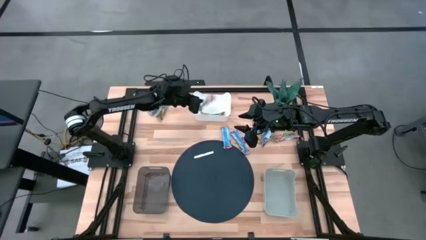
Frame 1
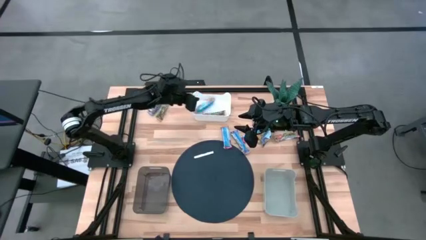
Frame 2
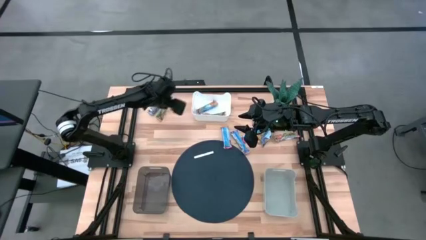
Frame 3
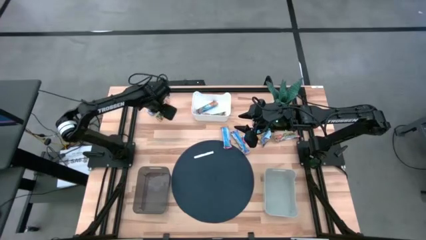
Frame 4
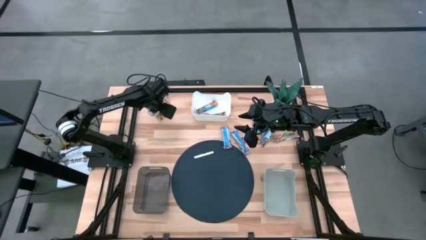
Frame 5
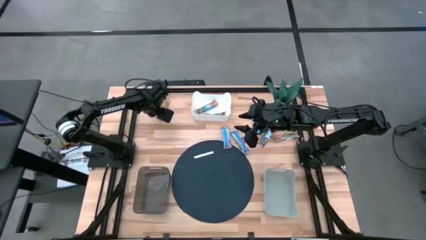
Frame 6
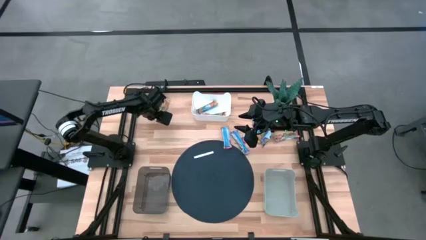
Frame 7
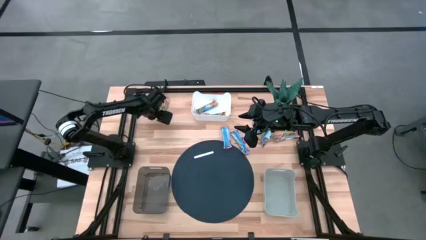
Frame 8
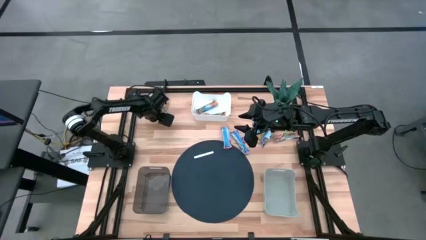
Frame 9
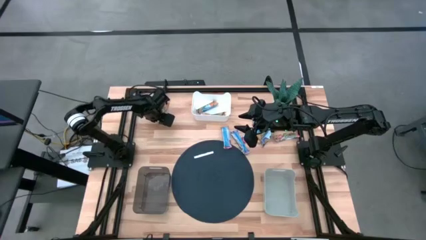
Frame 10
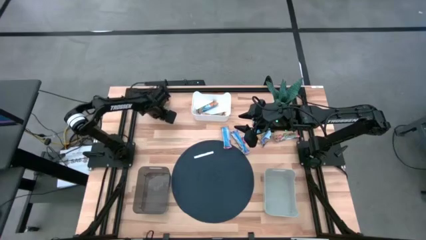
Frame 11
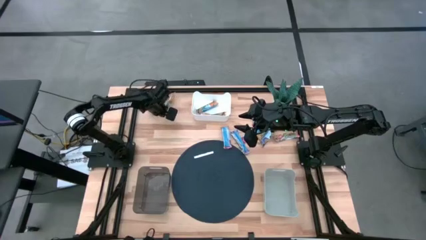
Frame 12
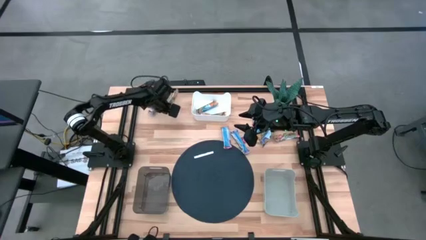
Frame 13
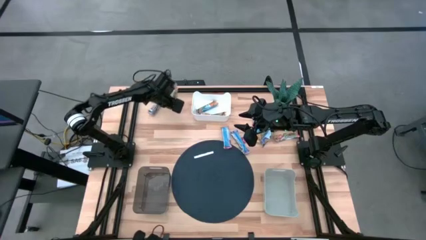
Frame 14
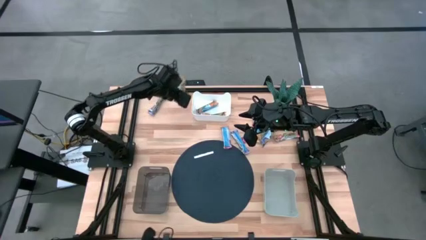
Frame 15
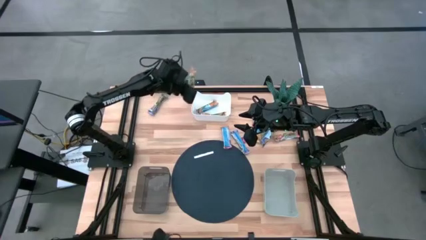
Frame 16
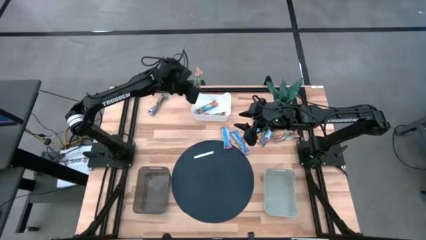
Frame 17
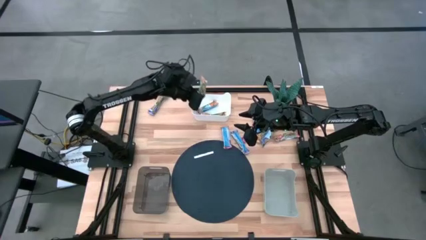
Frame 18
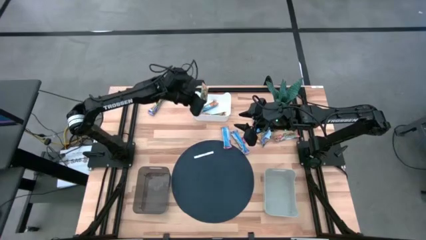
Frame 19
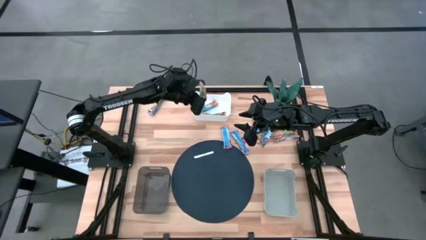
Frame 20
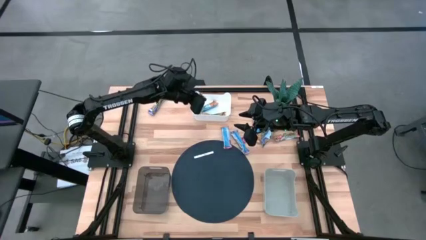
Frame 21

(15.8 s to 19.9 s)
Task: Pick and place Granola Bars by type
Put the yellow granola bar into the white bin

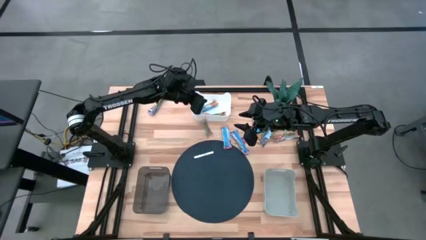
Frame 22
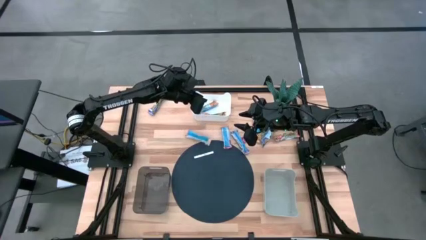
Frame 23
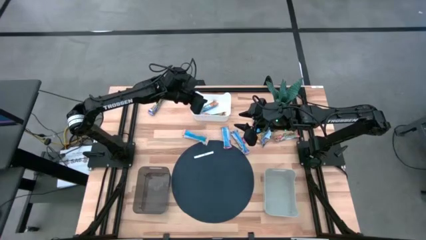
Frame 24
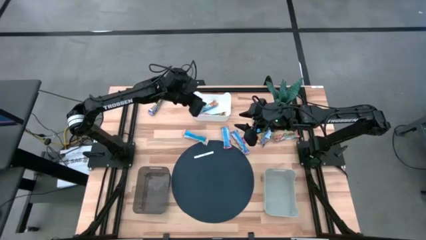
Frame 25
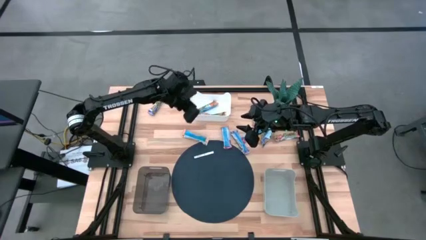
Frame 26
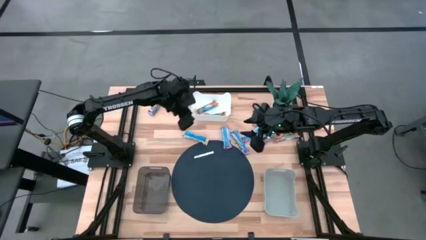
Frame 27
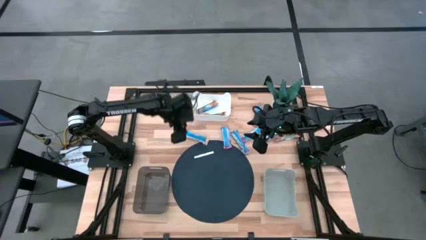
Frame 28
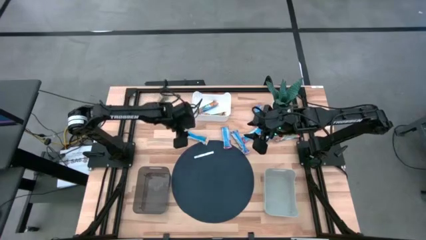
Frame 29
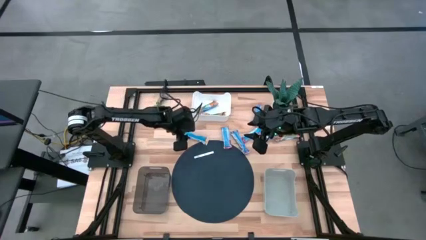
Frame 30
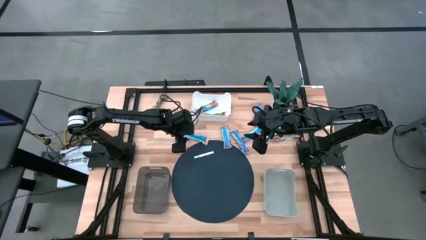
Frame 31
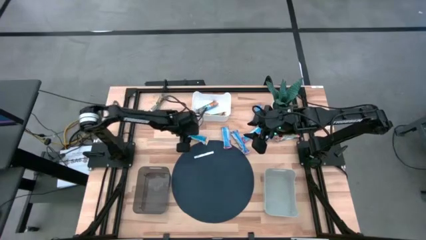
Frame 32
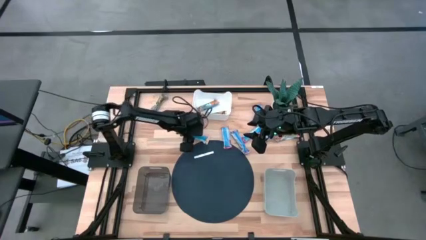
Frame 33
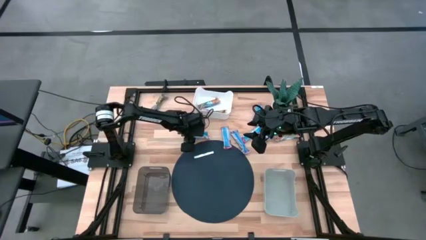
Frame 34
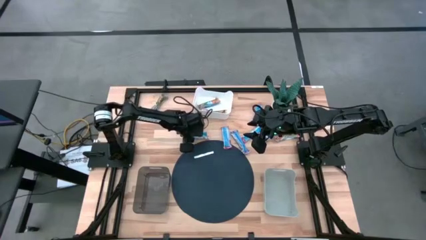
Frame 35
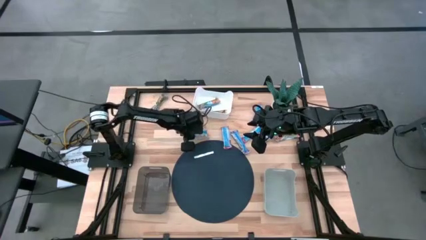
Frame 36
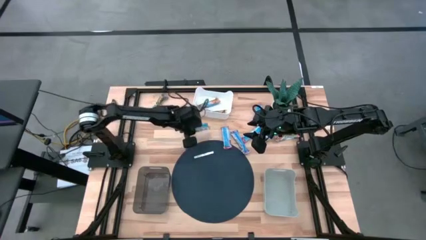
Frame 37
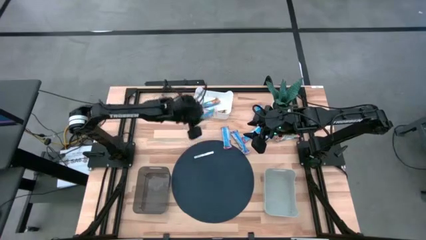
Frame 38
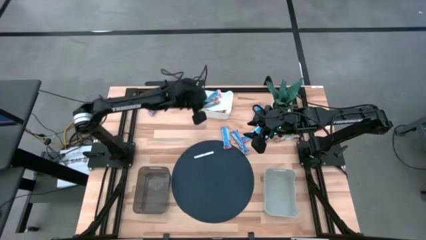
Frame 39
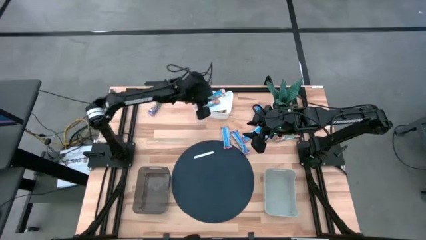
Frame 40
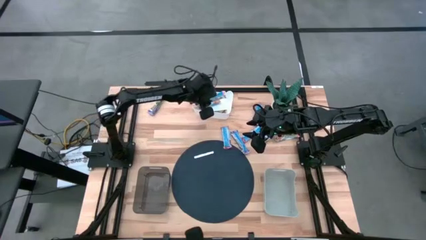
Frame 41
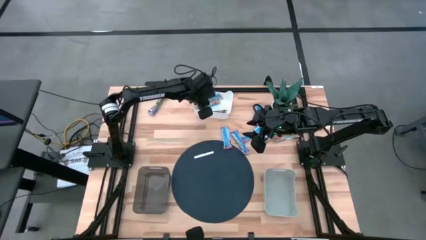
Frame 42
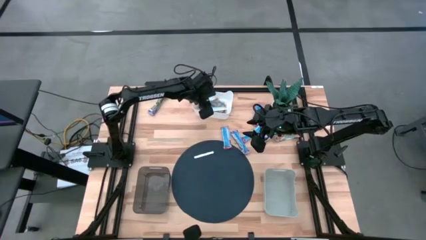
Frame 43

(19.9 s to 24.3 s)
Put the yellow granola bar into the white bin

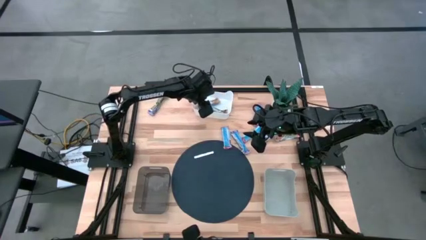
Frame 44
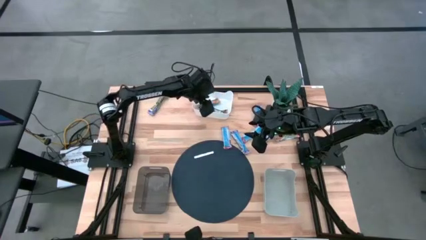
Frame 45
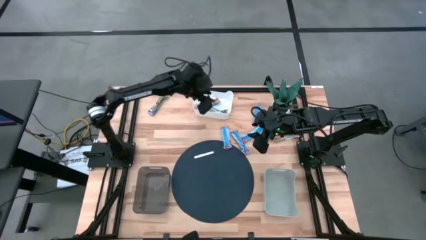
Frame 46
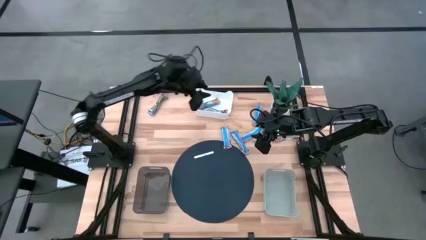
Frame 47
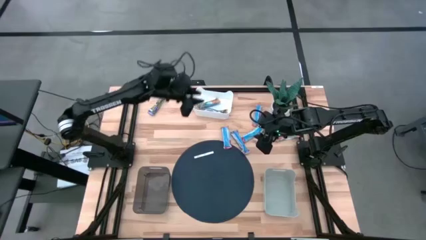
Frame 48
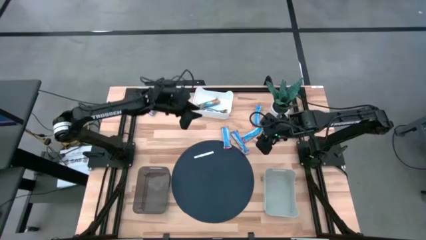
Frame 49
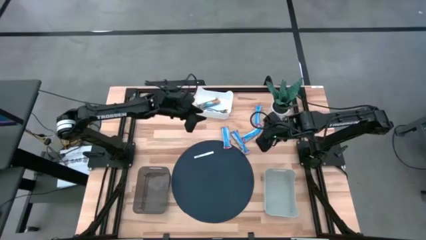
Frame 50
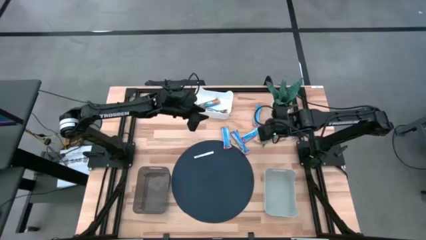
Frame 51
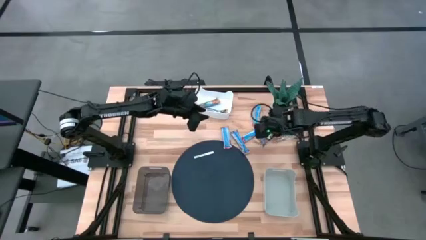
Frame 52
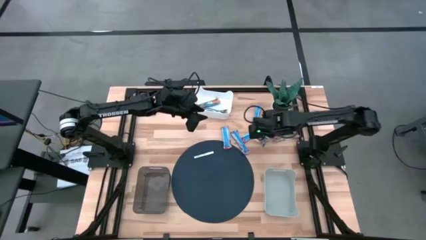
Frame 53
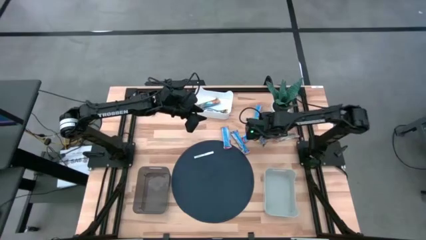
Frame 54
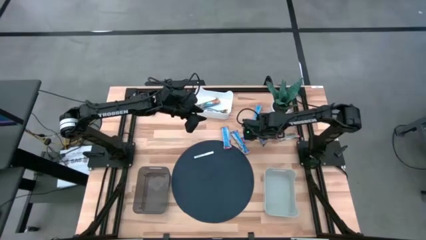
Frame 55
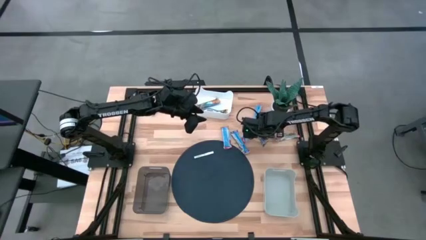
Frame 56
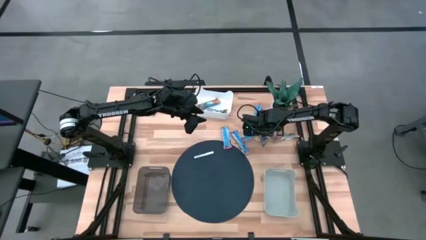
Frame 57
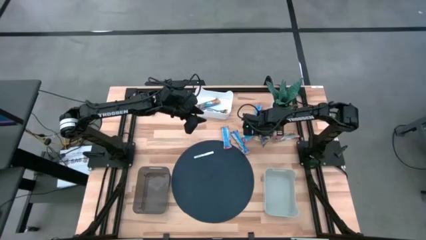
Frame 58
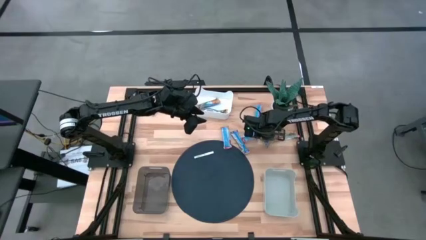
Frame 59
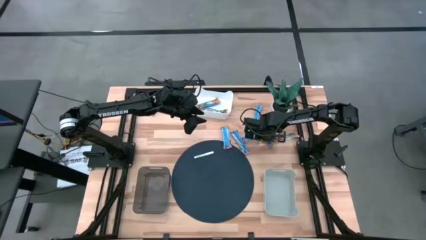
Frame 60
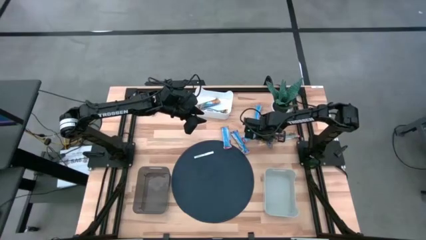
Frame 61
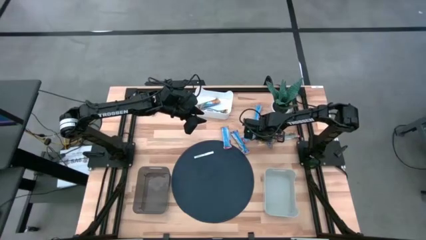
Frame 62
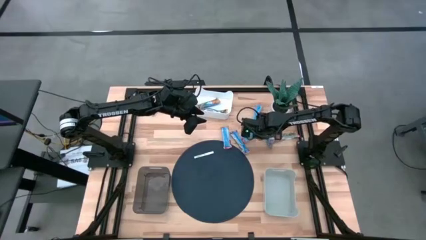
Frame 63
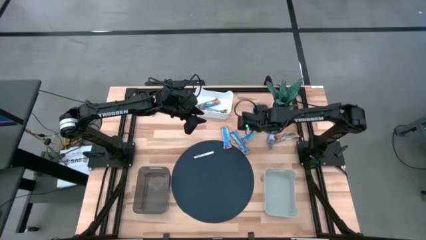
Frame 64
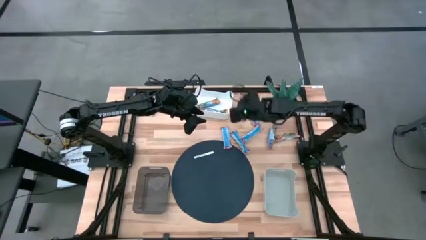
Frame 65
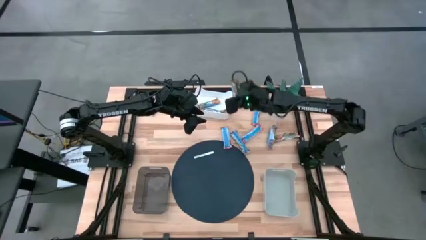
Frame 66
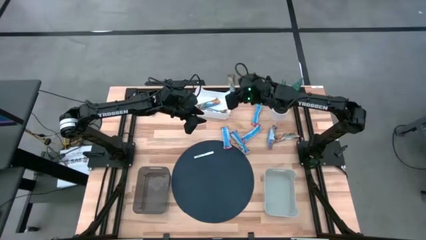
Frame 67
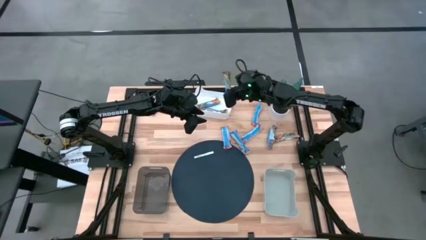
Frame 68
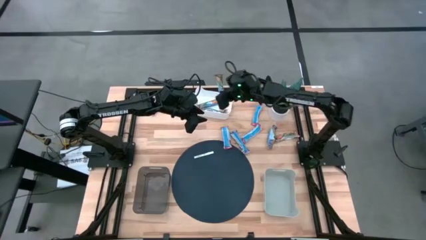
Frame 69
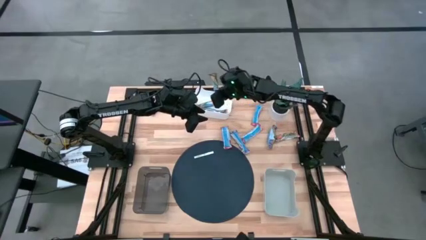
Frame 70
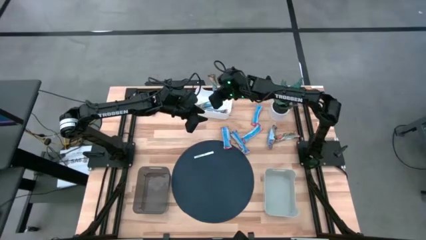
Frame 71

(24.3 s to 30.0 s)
Put the yellow granola bar into the white bin

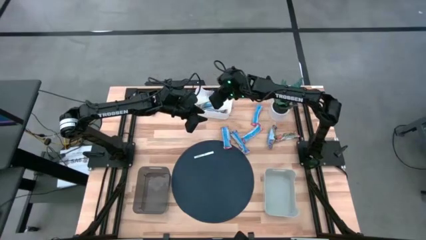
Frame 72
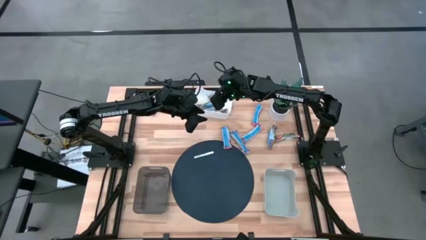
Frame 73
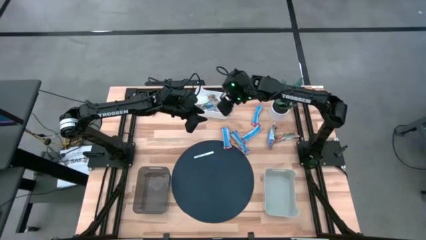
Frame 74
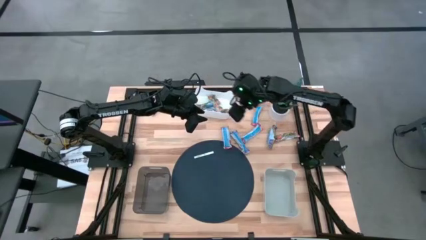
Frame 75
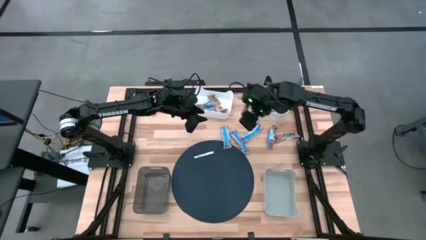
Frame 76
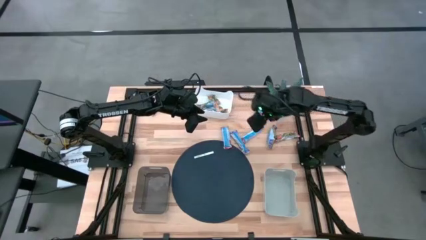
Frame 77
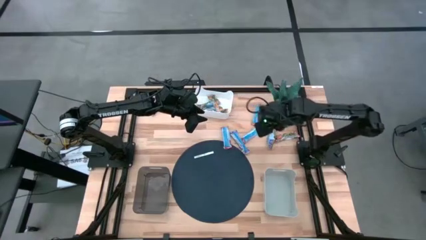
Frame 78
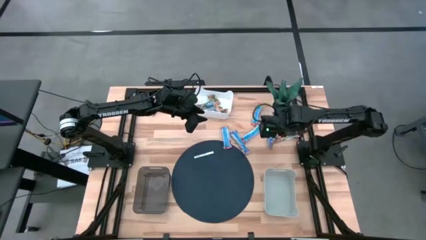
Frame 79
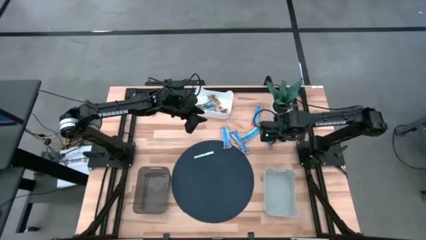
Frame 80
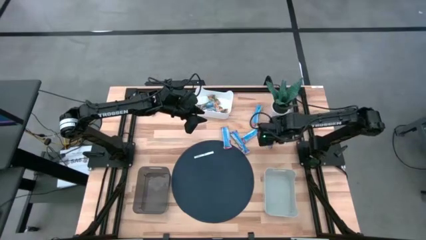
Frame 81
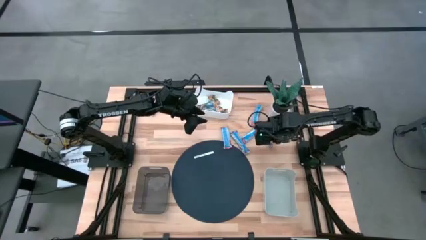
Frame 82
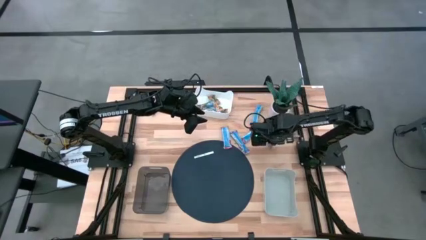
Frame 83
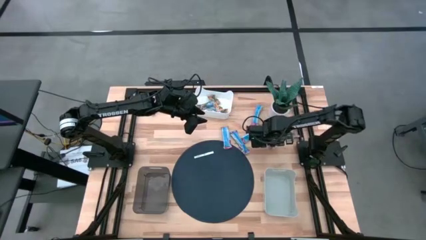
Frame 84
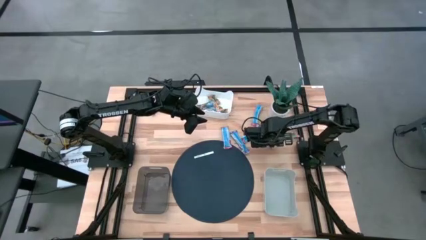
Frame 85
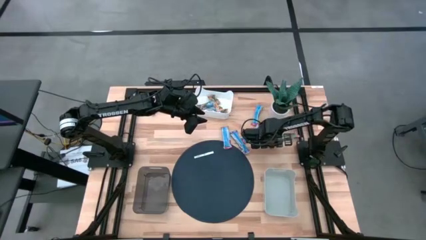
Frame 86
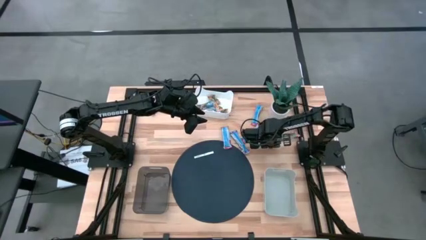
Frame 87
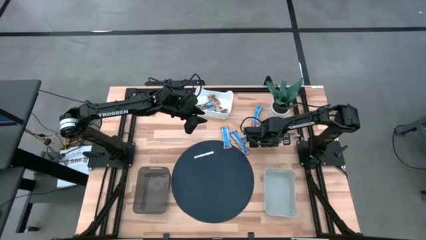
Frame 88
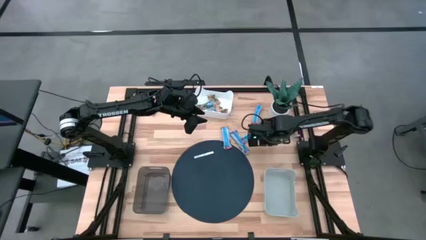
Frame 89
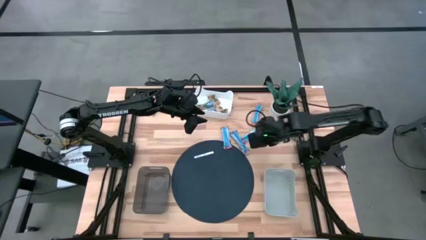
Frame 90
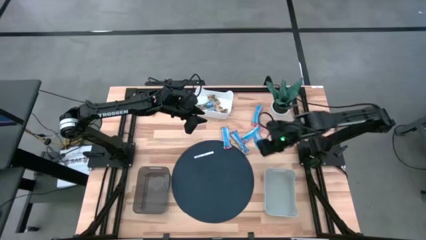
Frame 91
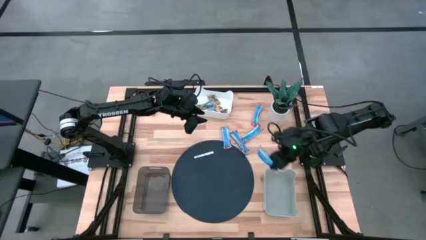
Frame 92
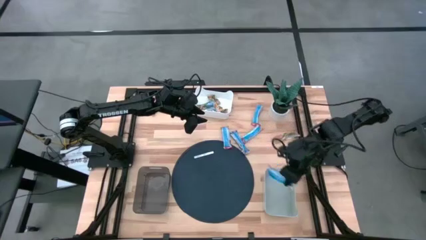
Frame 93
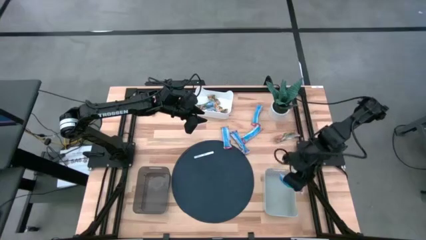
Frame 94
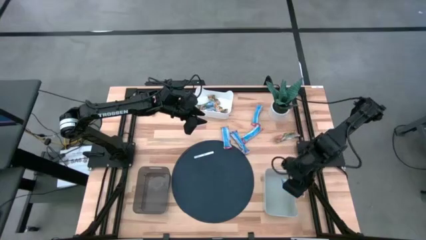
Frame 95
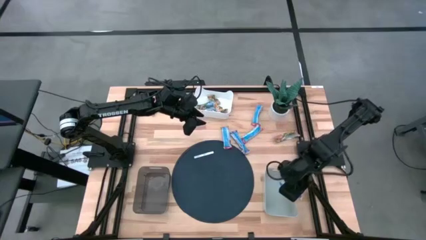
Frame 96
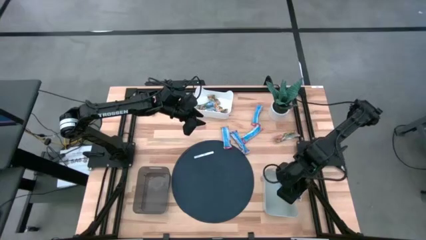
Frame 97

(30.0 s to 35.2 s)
Put the blue granola bar into the gray bin
